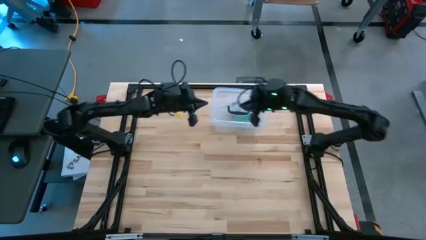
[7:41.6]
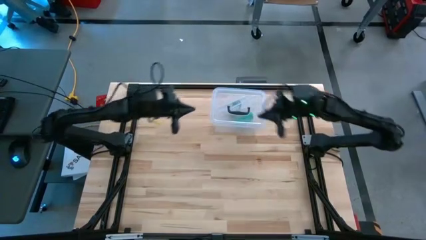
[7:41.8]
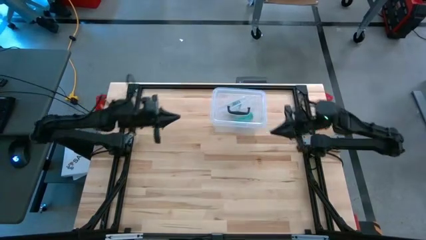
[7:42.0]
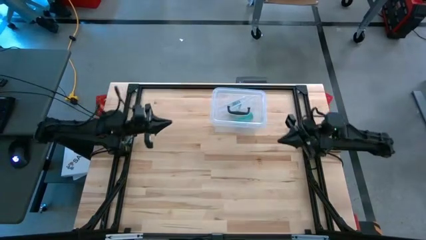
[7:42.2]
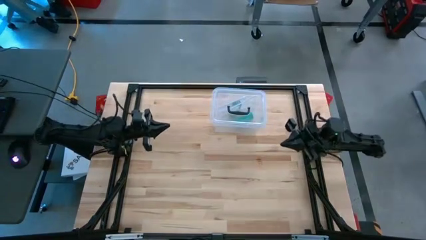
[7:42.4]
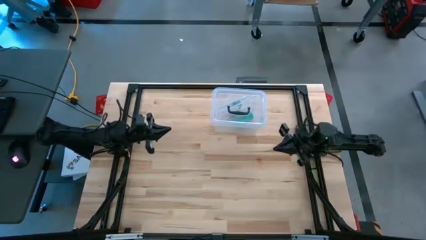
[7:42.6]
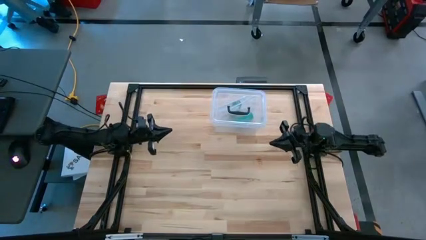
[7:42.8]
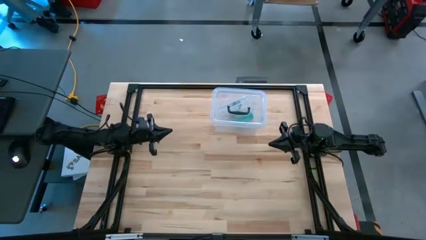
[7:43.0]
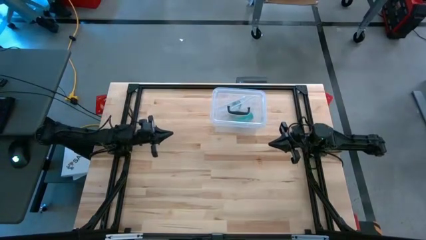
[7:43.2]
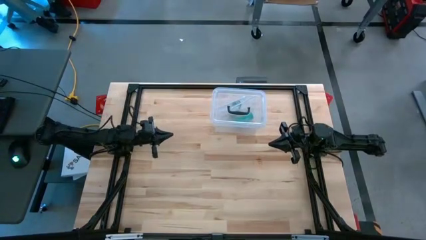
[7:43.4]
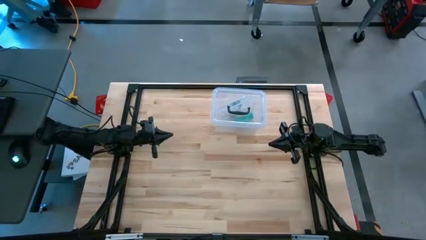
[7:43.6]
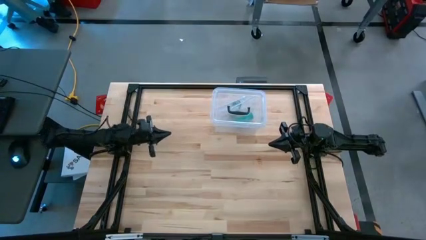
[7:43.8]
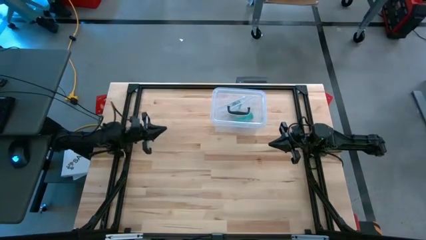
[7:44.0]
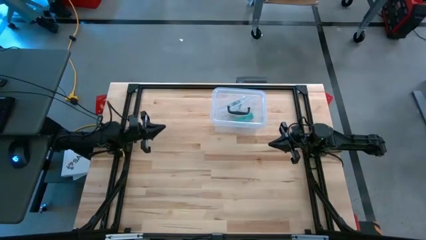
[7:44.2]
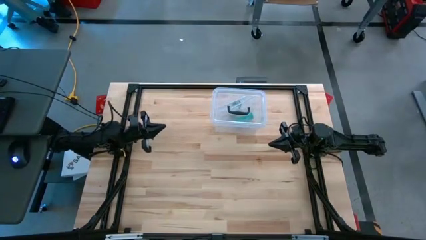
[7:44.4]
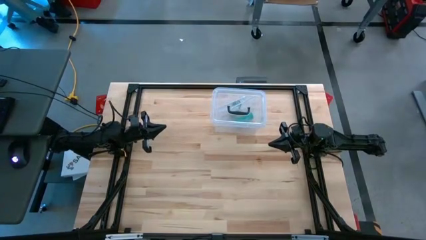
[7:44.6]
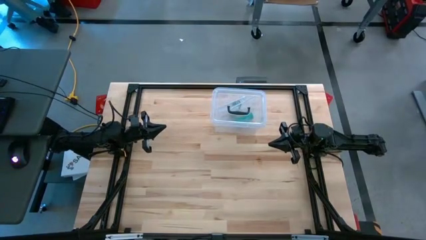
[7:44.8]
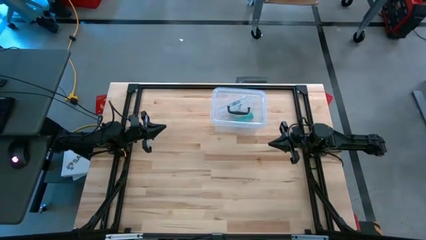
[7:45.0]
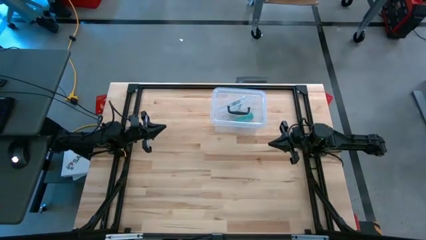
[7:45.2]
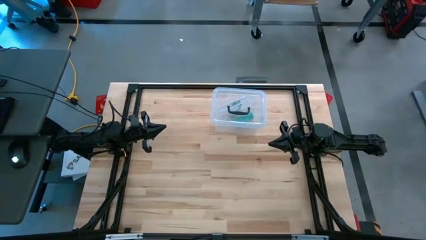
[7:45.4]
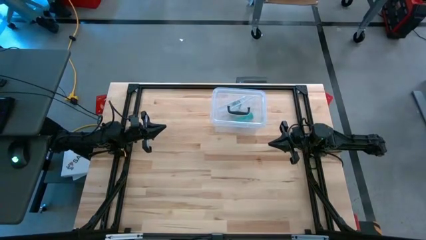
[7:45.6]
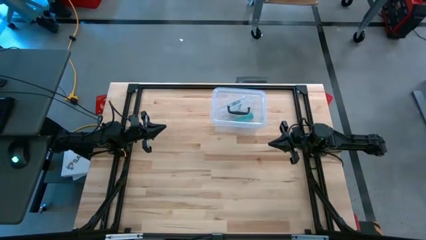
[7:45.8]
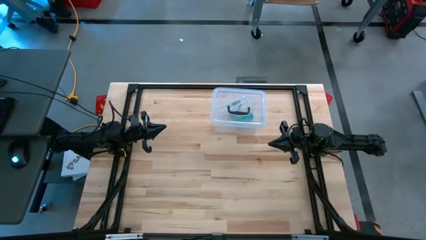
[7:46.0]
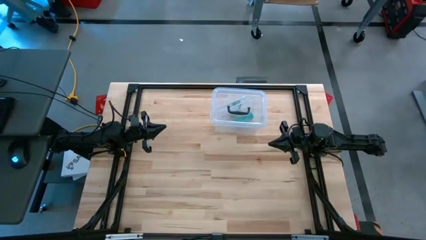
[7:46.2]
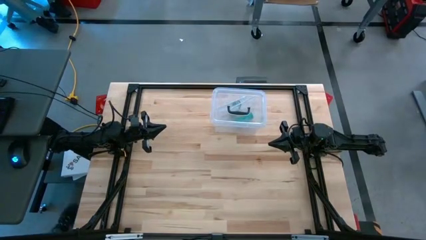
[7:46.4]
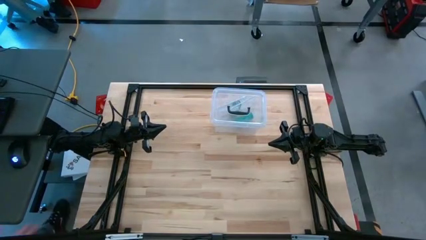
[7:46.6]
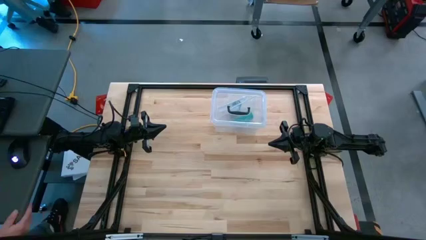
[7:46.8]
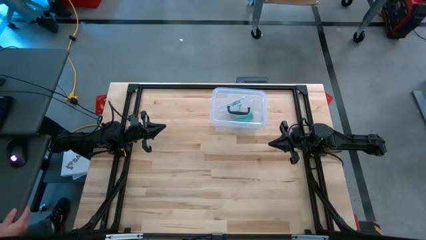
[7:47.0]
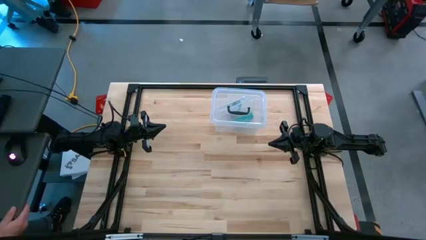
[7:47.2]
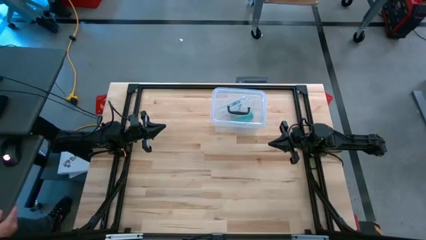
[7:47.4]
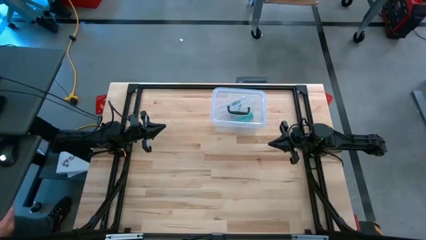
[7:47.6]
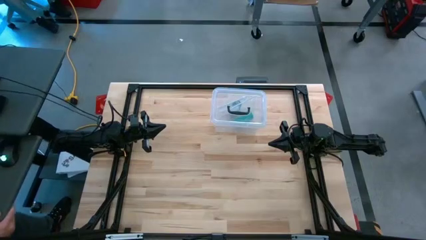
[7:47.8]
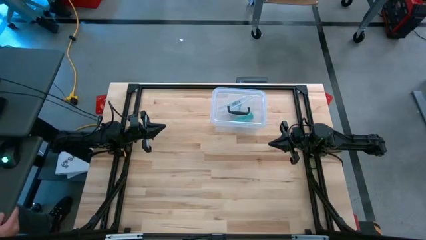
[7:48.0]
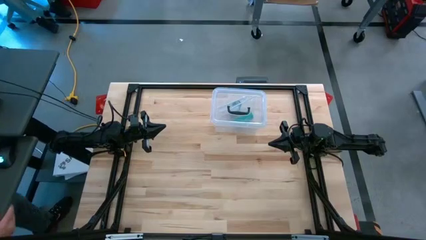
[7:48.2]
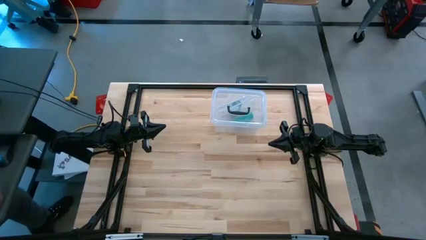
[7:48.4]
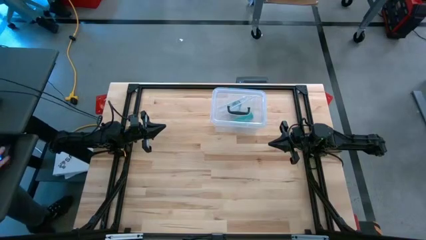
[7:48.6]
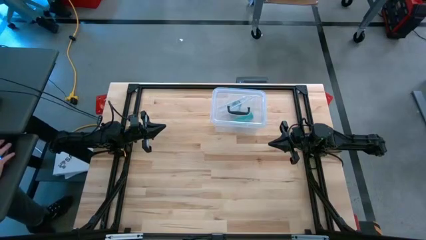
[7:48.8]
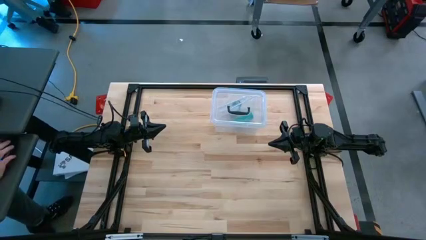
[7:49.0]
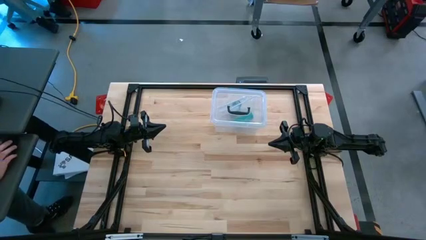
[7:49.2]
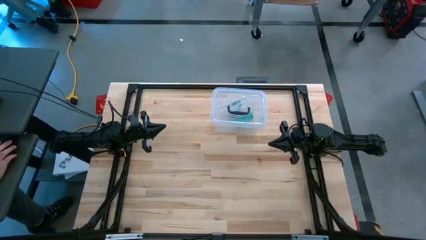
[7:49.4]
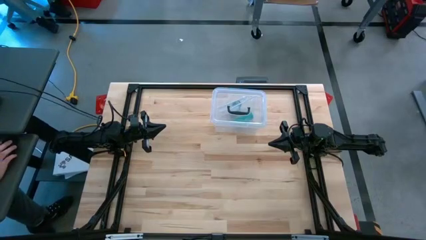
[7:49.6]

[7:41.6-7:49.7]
Task: Roll bandage
Return to Home Position

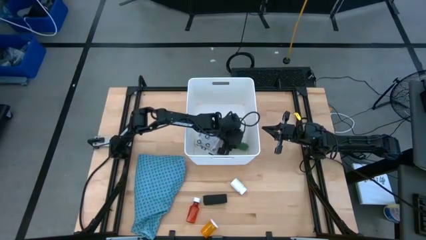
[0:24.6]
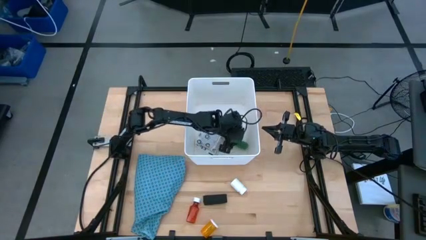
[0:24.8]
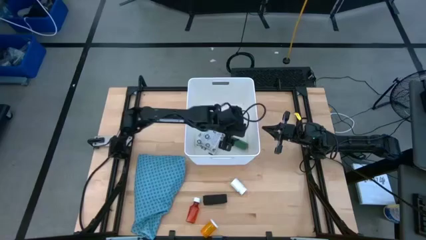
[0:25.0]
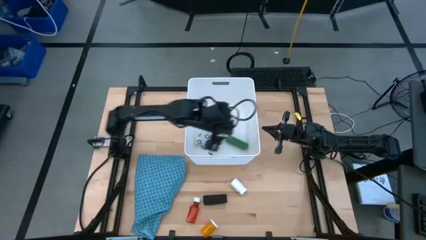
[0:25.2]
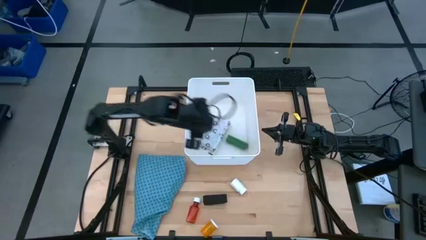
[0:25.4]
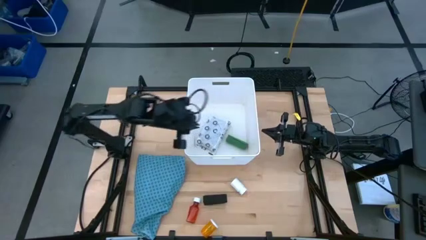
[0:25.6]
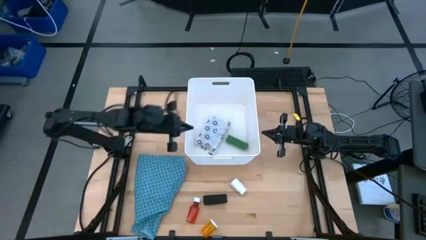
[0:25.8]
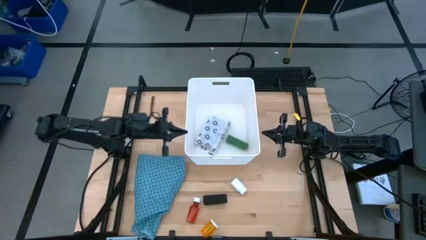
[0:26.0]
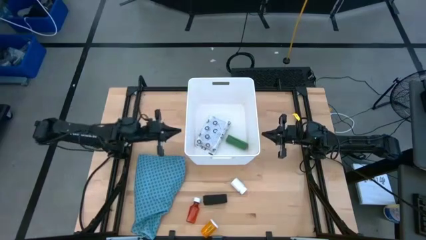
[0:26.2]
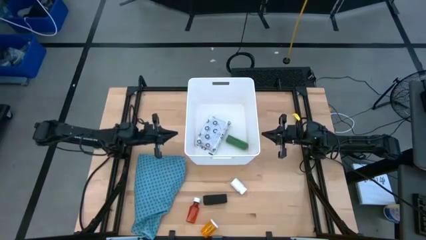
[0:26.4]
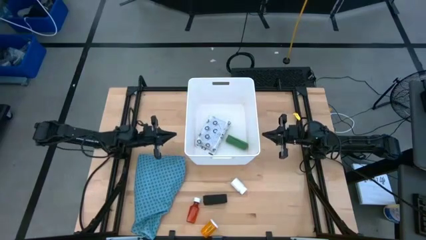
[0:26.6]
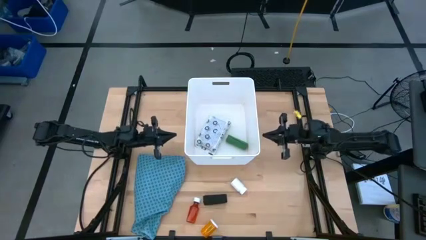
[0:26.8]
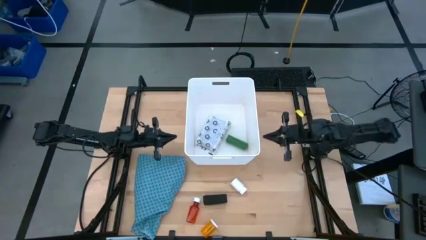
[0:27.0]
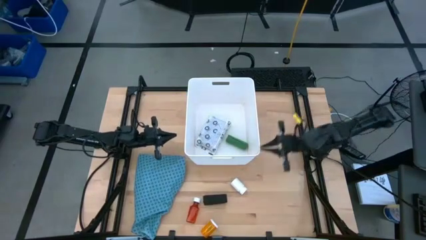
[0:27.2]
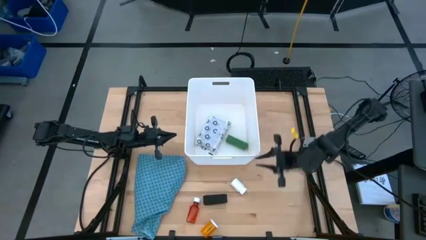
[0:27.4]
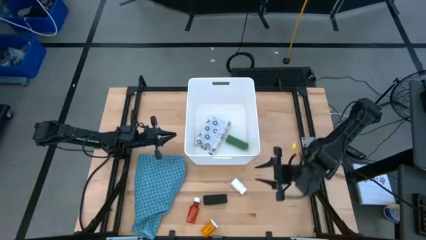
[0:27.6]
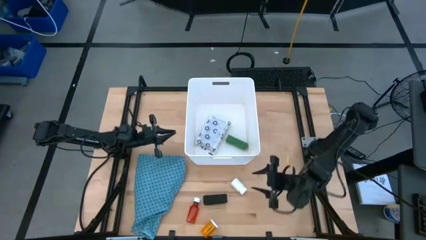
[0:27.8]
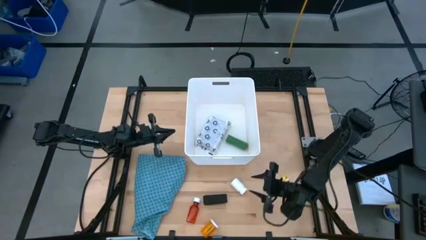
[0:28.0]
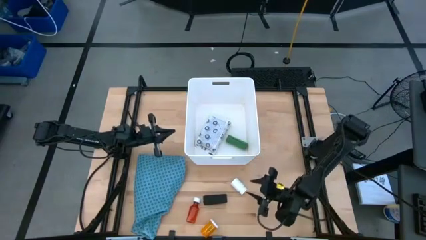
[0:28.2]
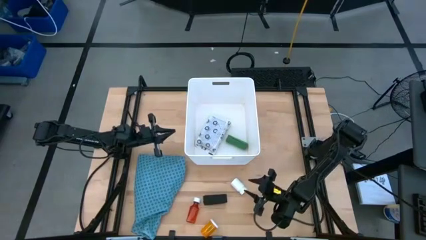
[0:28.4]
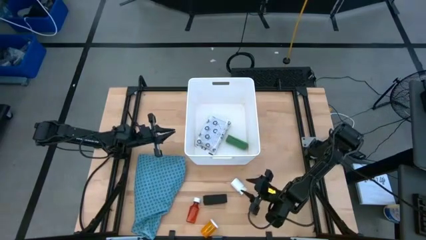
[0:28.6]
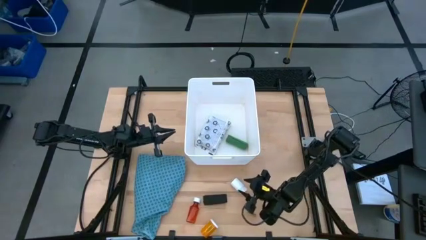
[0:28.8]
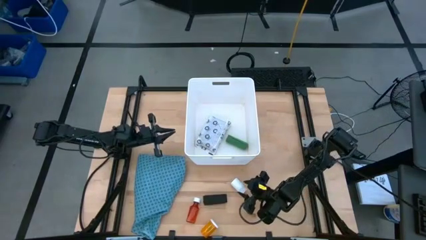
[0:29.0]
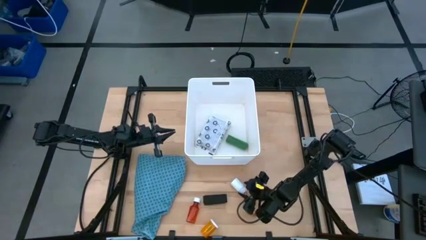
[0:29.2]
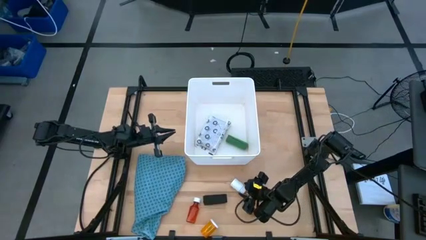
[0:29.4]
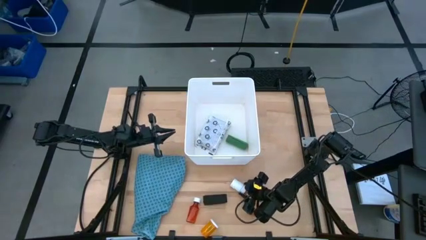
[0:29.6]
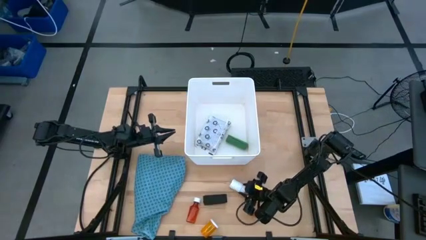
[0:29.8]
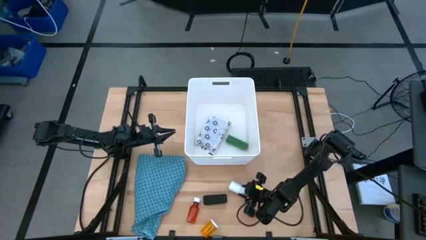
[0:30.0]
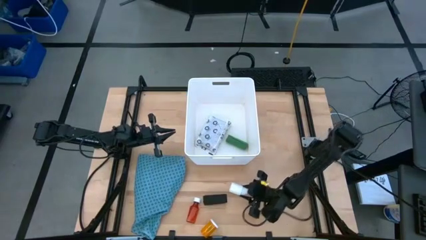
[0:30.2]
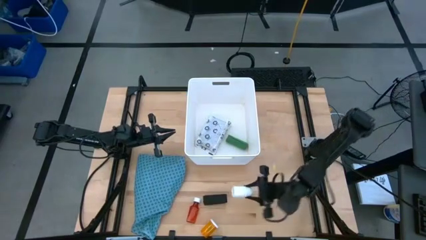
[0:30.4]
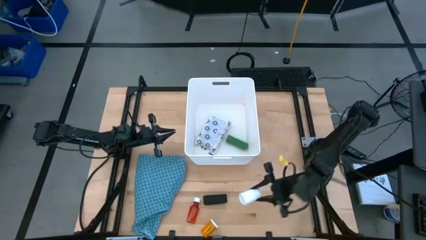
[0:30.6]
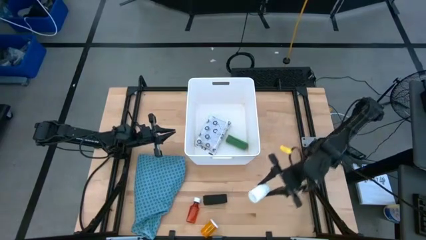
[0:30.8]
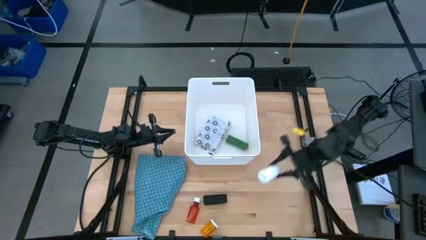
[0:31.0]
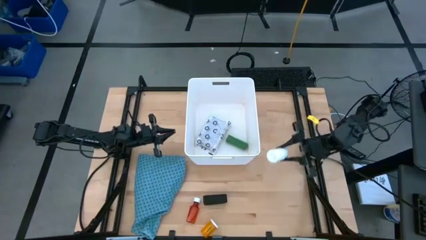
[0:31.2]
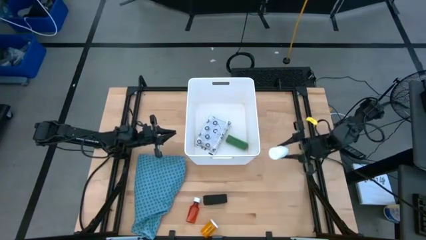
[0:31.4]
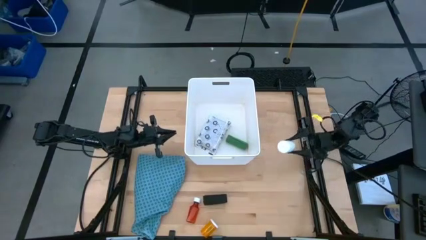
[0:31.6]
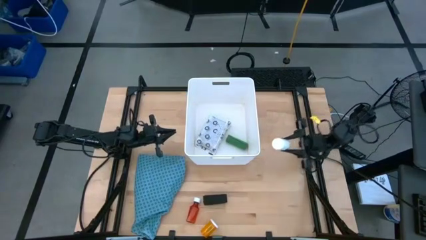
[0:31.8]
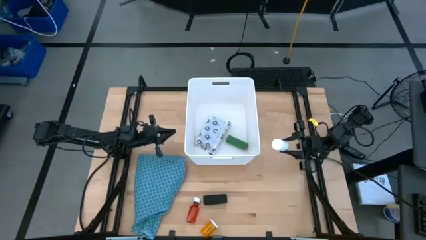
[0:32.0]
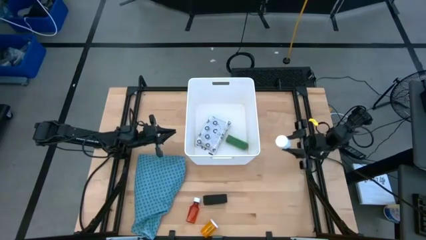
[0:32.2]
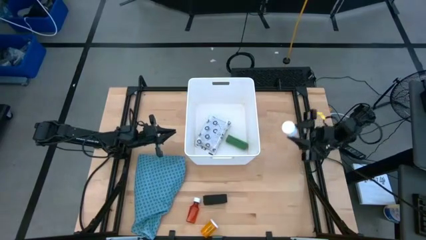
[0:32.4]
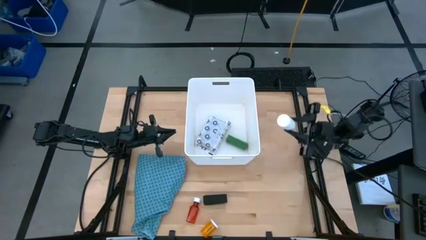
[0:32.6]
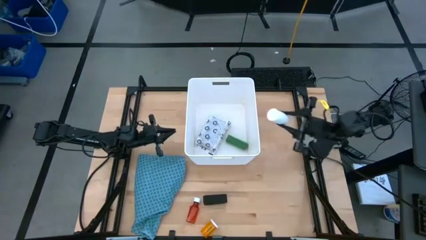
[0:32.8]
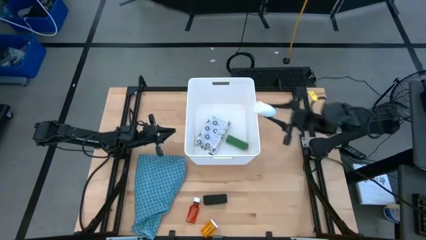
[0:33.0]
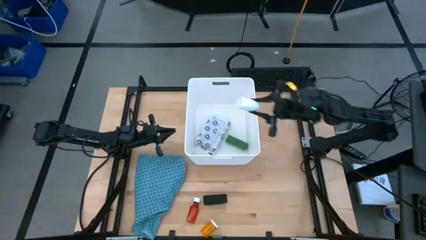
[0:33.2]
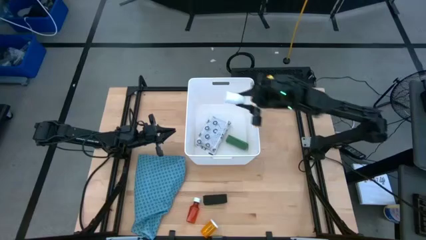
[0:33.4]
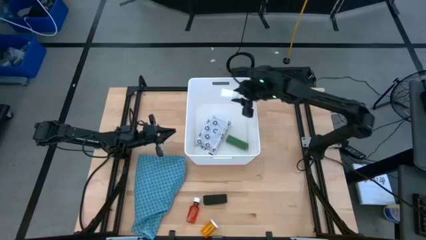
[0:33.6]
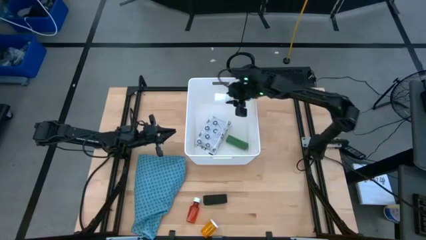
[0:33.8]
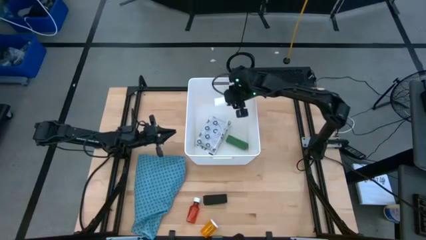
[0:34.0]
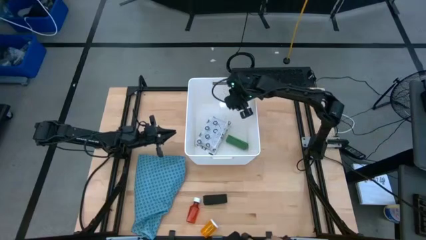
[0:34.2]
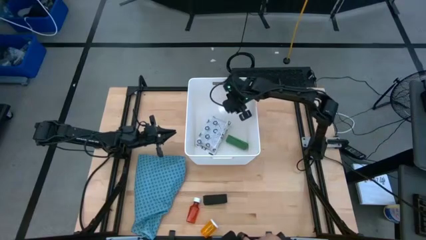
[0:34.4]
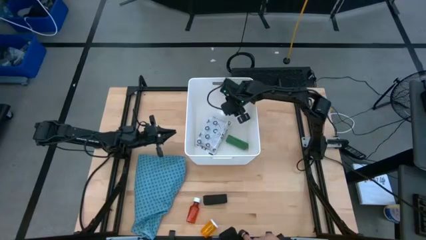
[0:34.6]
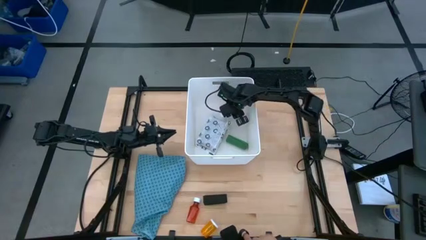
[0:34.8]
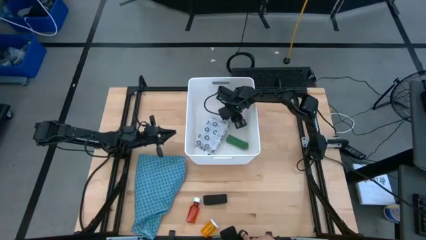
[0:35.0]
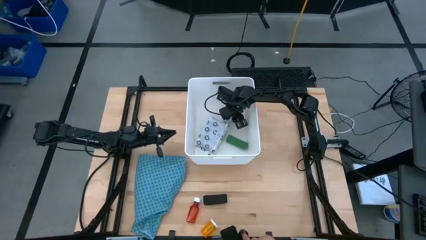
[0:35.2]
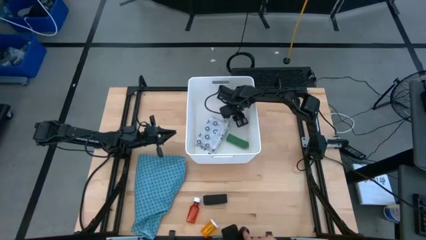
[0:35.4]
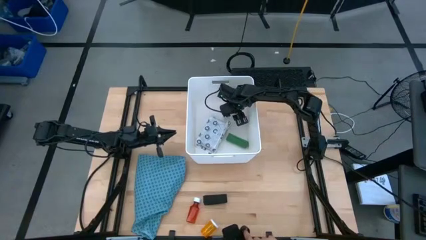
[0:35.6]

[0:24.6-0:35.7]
Task: Pick & place medical supplies in basket/bin
Put the white pill bottle into the white bin
